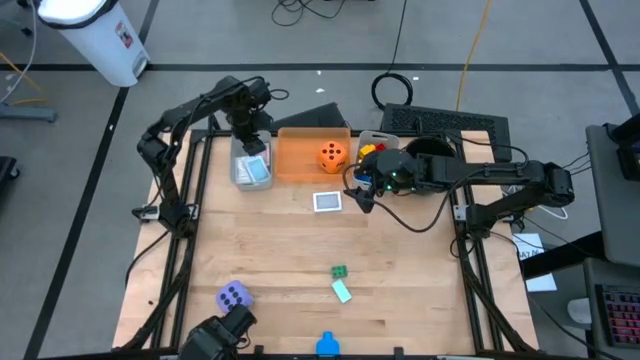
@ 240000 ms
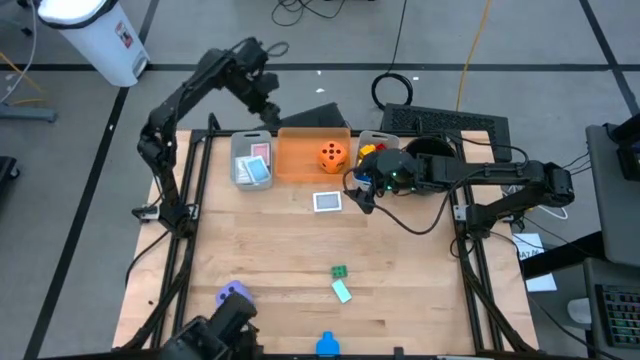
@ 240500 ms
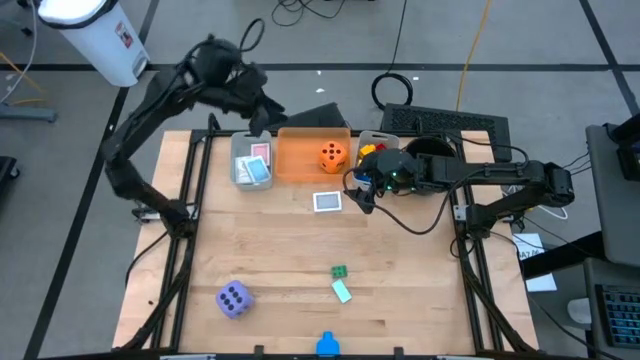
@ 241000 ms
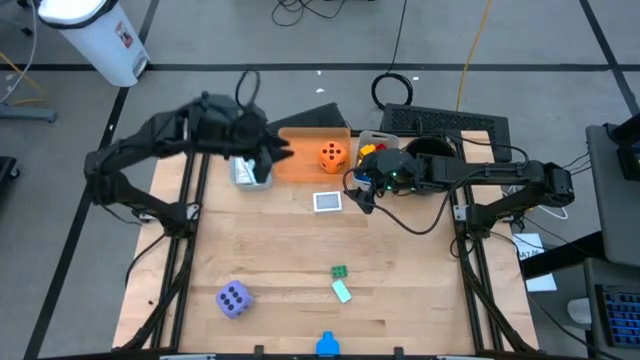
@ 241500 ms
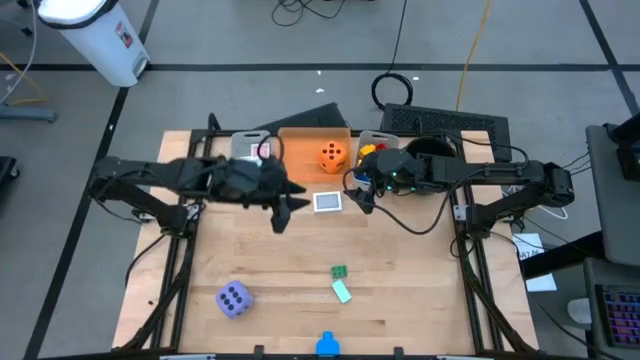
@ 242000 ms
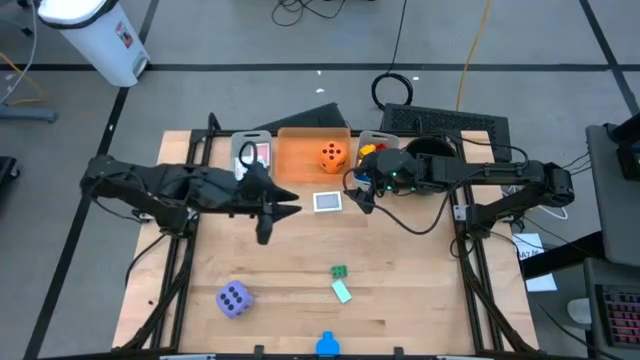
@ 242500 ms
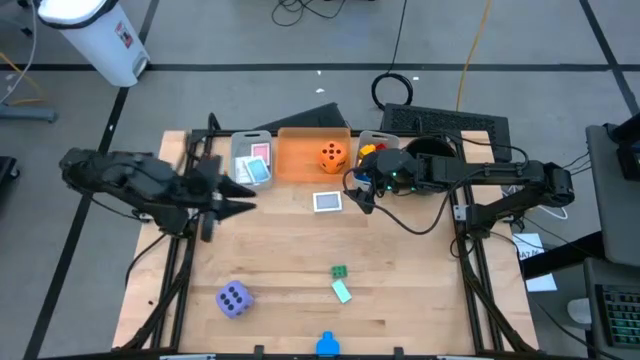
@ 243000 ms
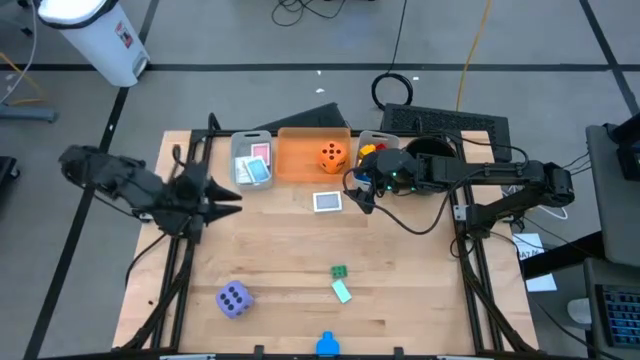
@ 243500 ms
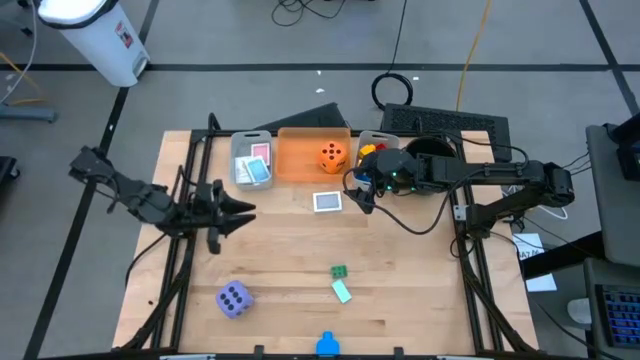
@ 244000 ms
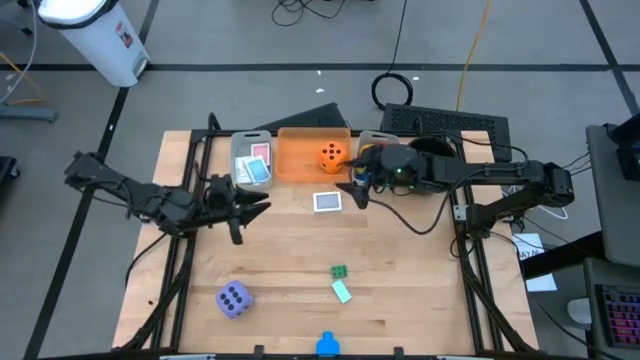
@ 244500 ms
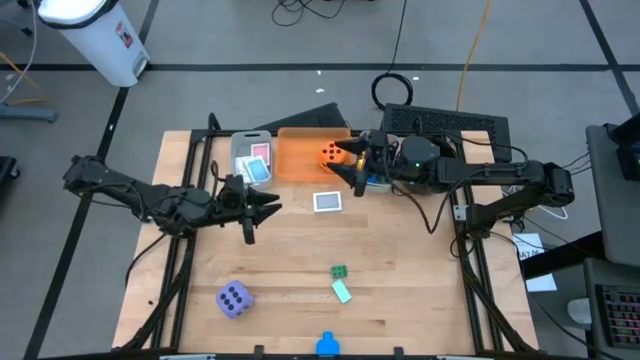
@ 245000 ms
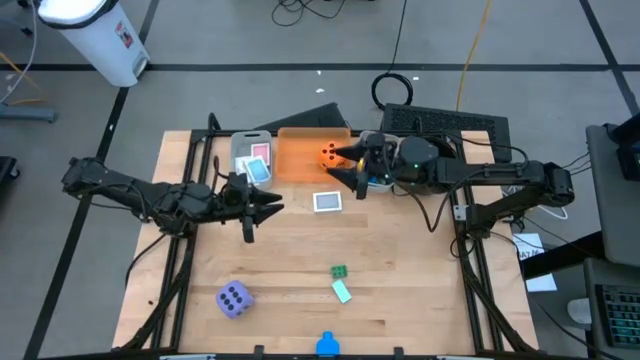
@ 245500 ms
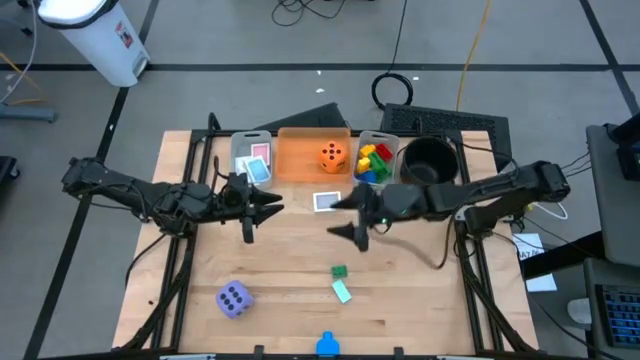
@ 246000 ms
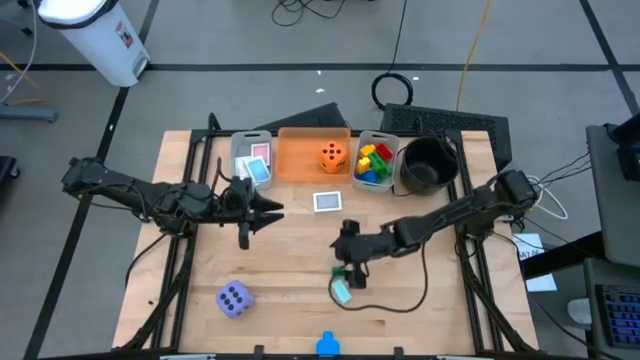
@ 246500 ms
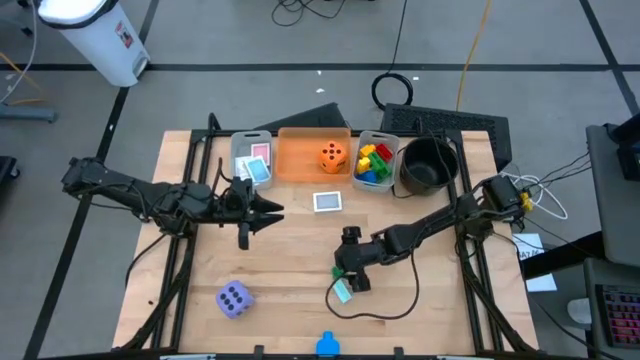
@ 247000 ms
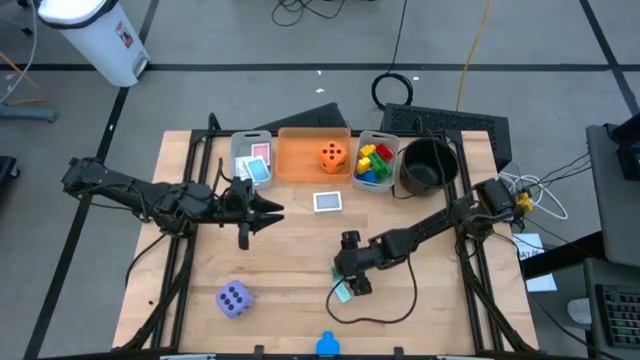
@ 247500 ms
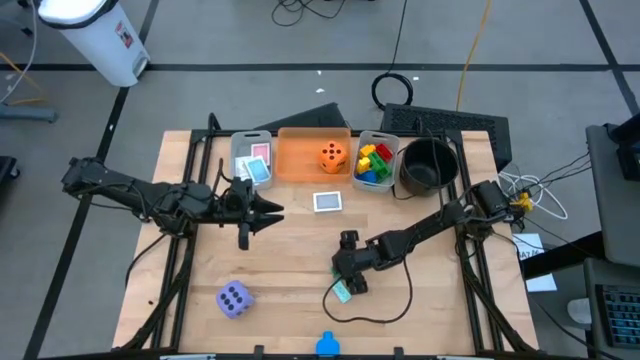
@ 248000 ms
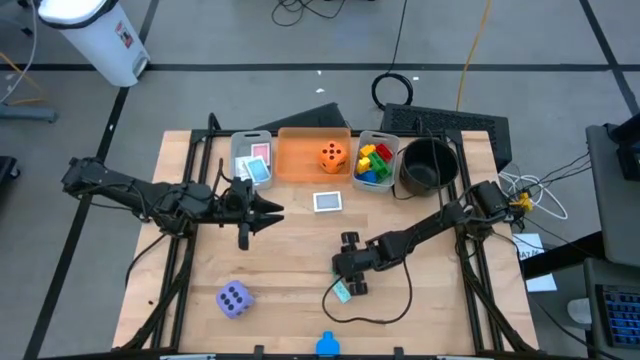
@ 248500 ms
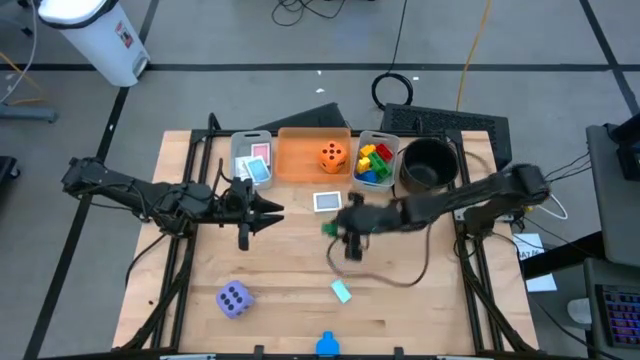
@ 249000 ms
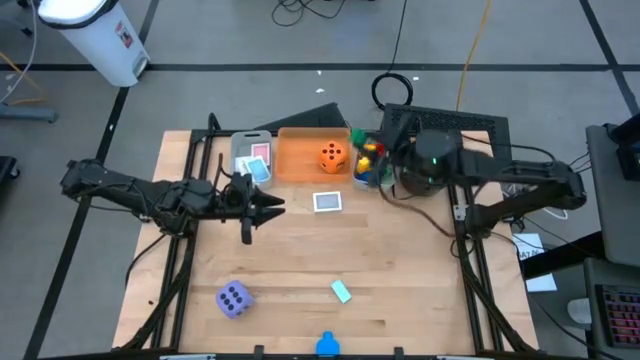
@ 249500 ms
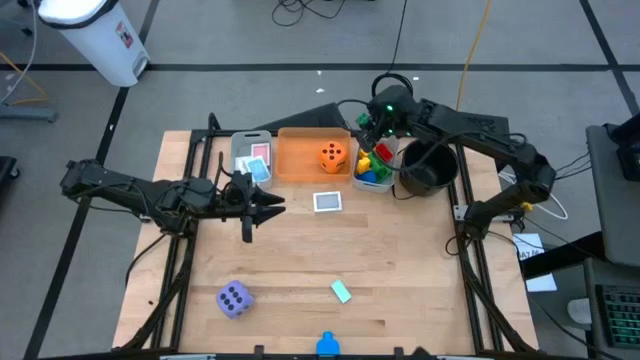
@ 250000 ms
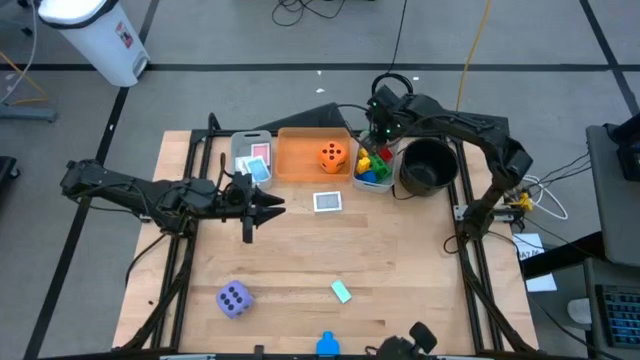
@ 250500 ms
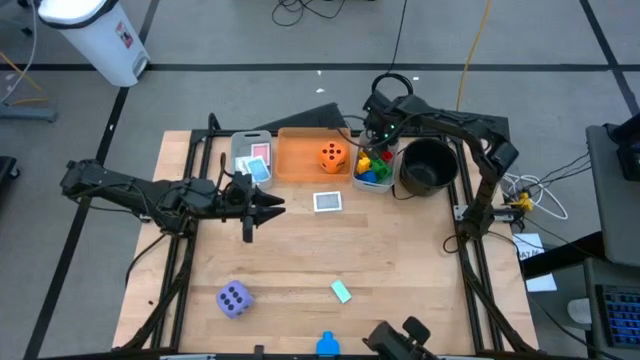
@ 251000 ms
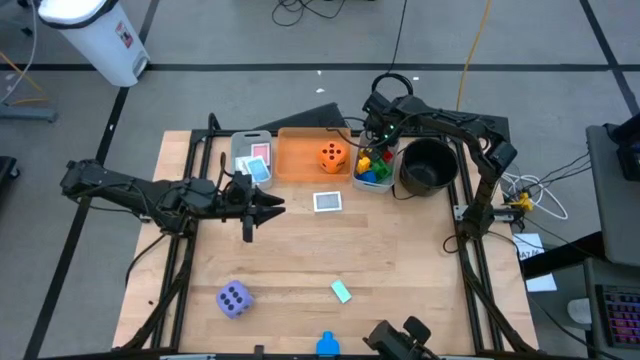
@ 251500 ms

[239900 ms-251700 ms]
Task: Pick & Place Toys
Put the green game piece into the right gray bin

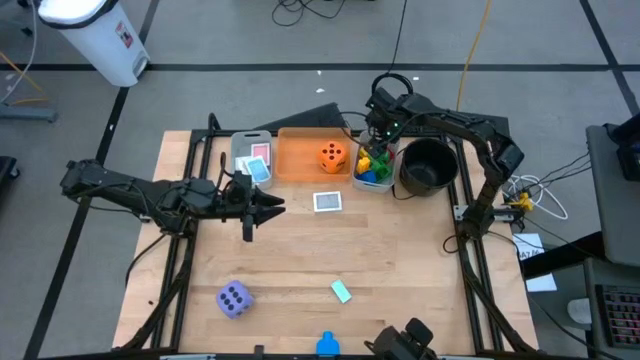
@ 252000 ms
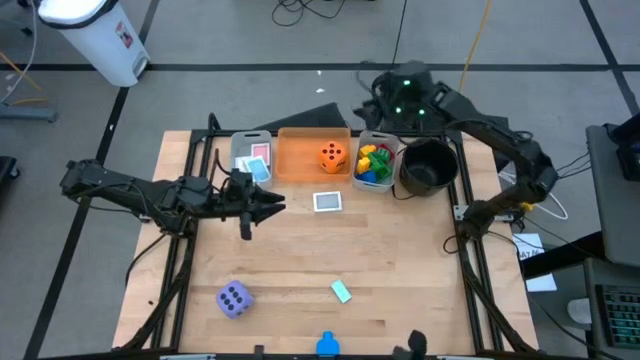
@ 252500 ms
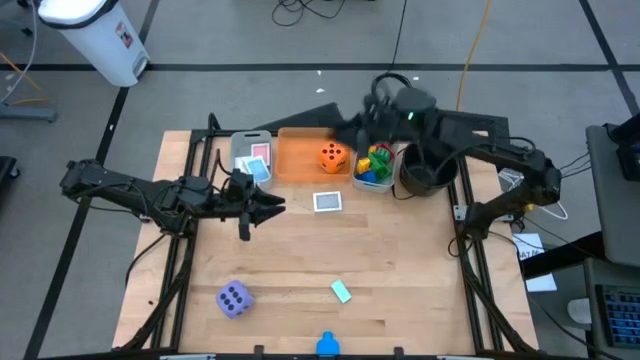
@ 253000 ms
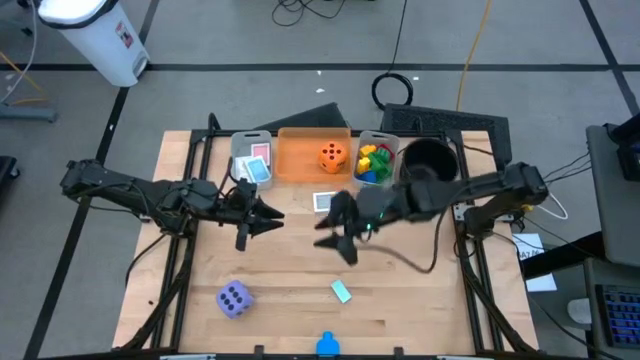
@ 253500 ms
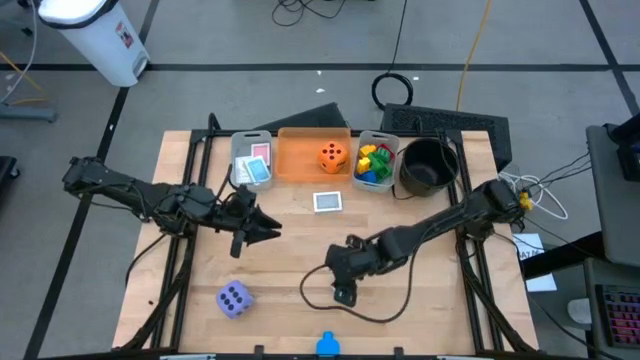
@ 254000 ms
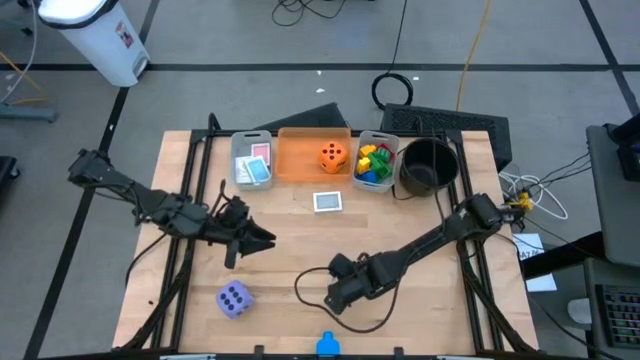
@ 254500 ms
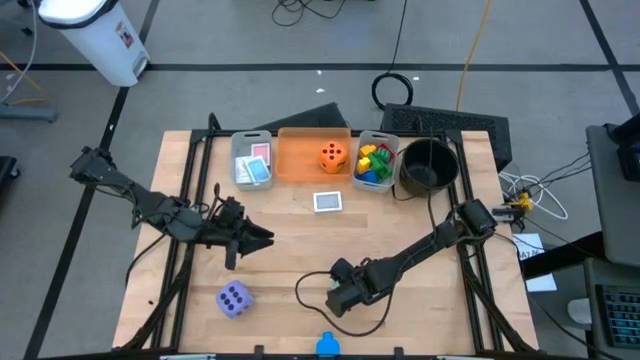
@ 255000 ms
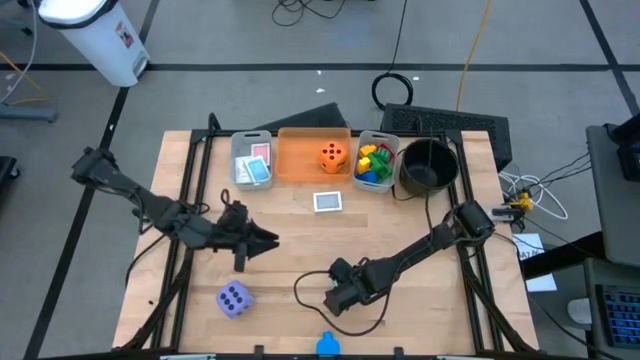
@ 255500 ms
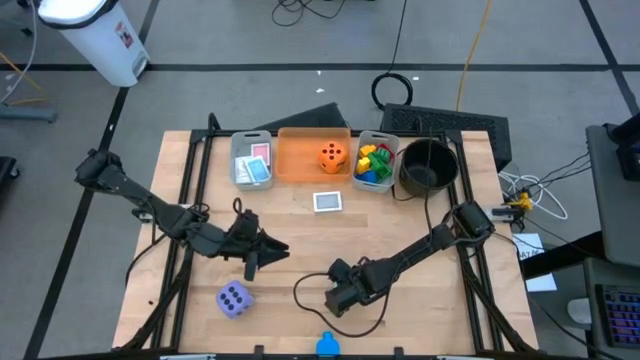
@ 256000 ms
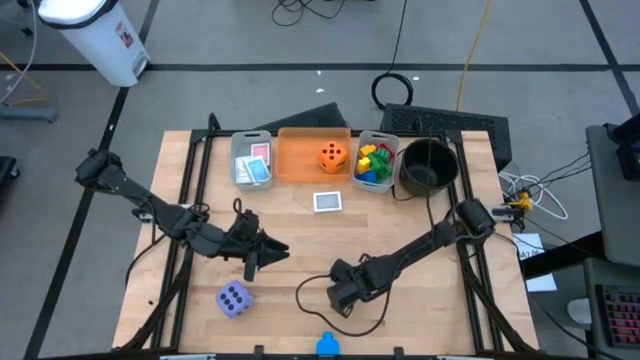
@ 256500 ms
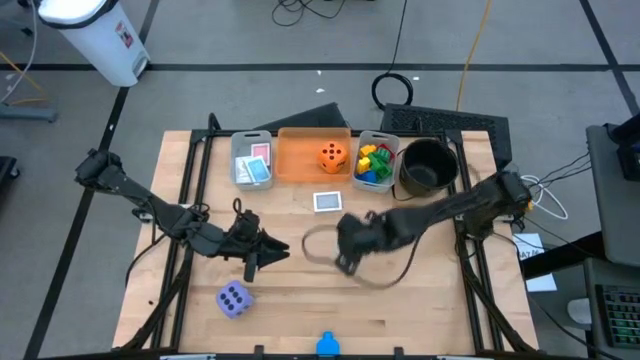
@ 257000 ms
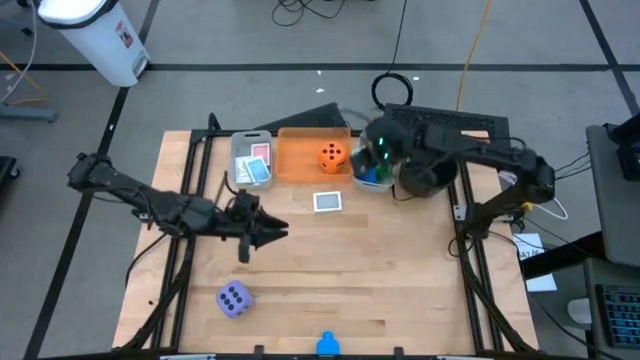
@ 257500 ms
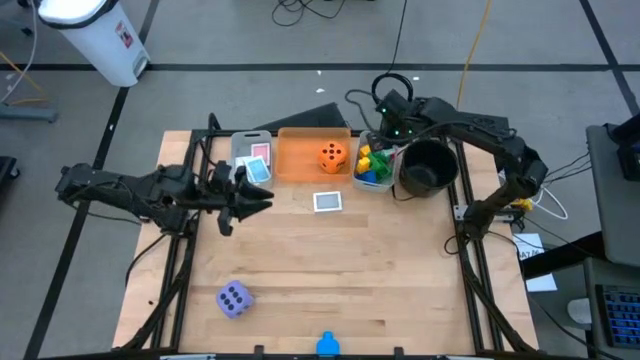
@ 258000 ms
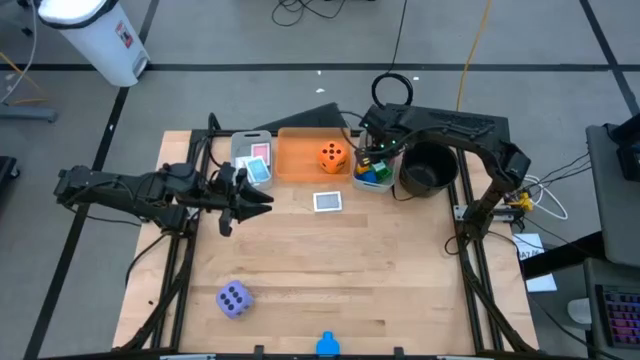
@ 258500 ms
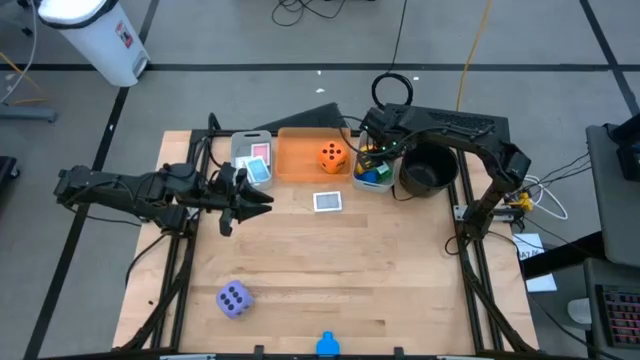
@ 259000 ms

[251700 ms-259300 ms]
Put the light blue game piece into the right gray bin

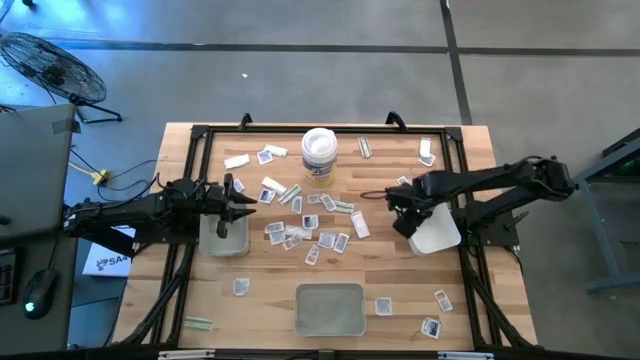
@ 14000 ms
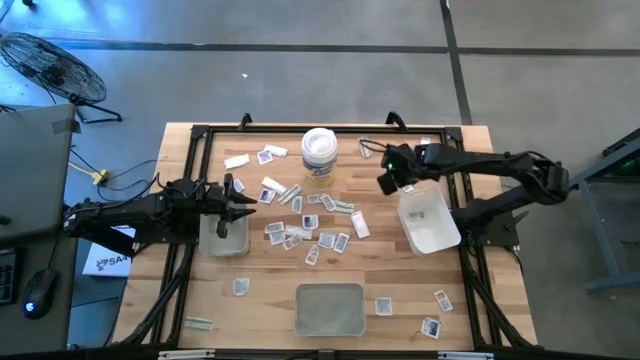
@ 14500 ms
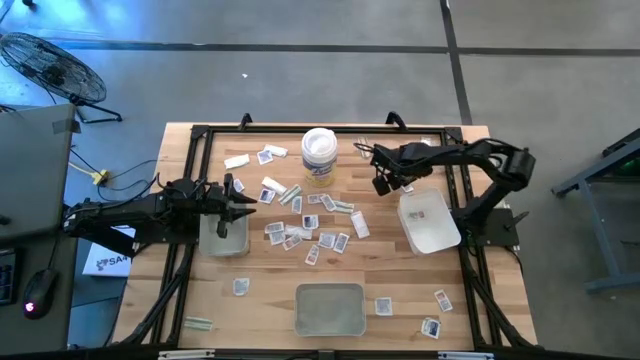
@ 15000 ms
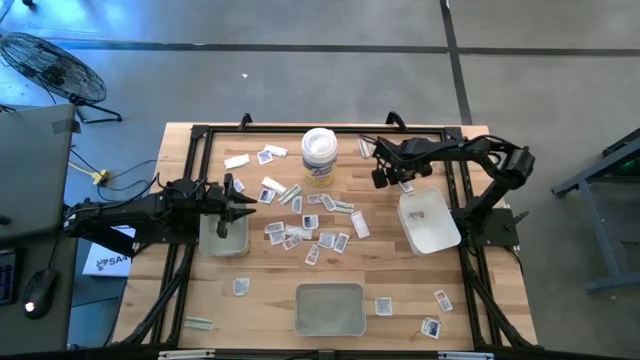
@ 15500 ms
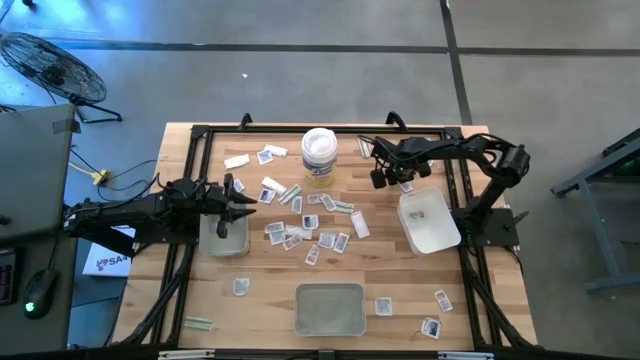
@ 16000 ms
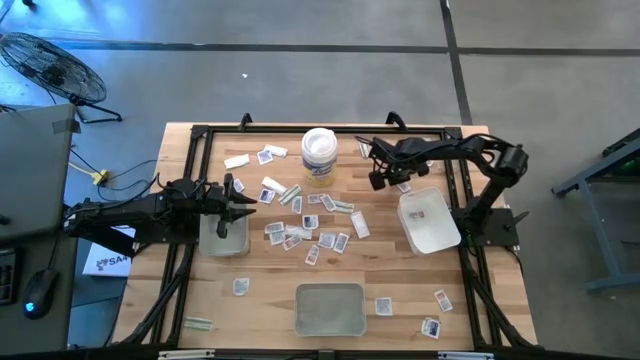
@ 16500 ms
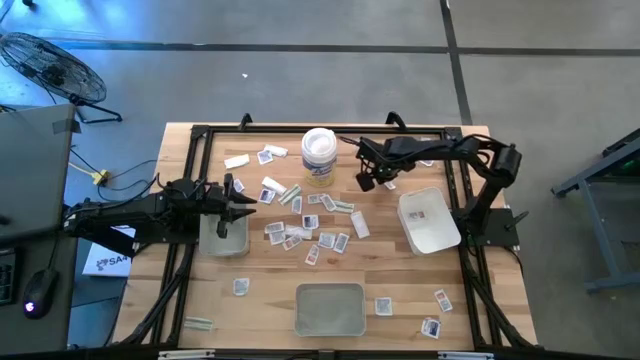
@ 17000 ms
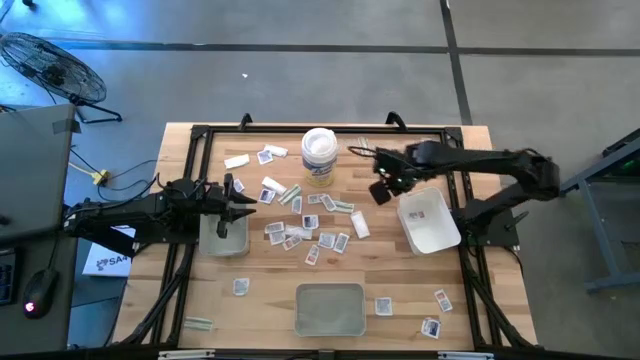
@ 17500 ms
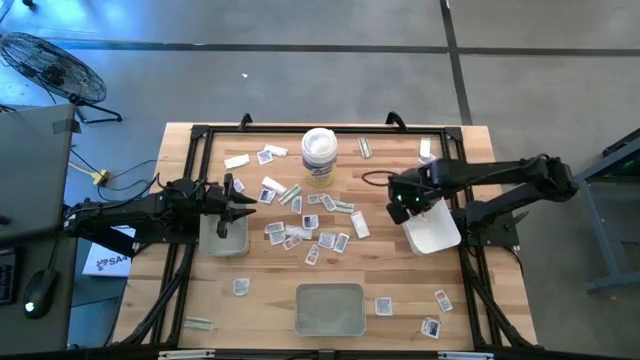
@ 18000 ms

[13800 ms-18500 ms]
Task: Pick & Place First Aid Supplies
Put the orange ointment pack into the white bin
